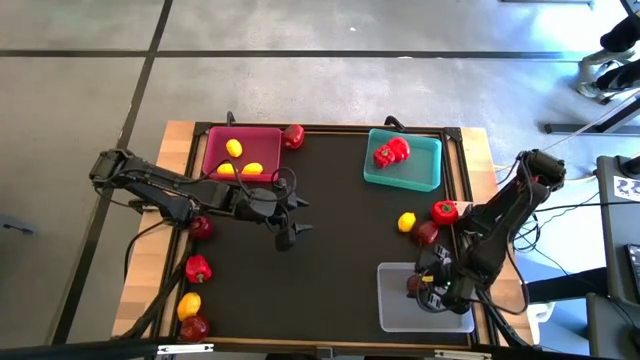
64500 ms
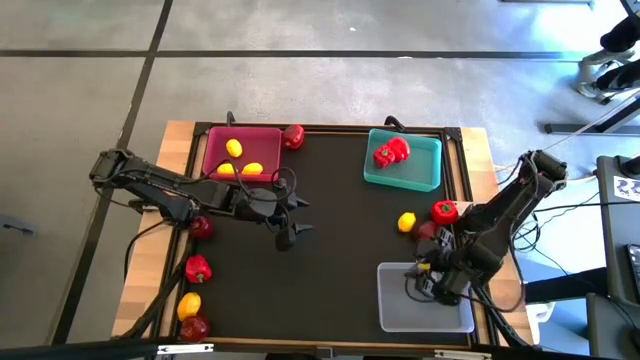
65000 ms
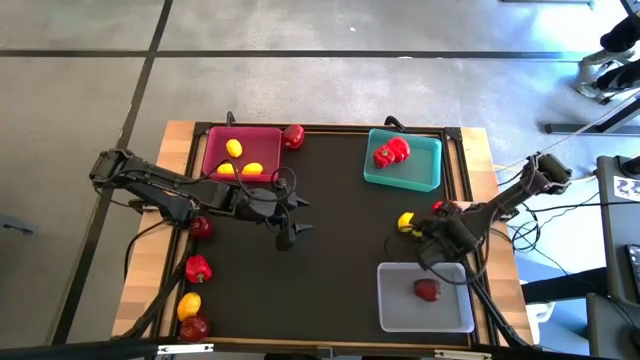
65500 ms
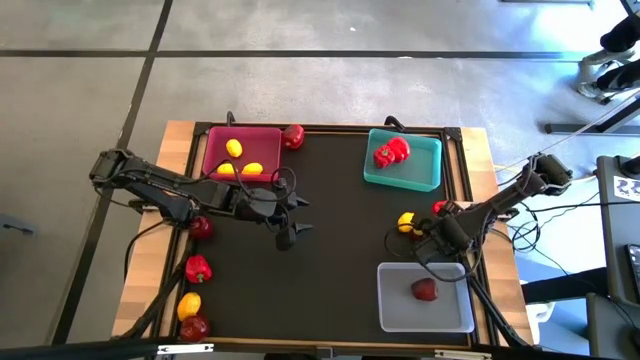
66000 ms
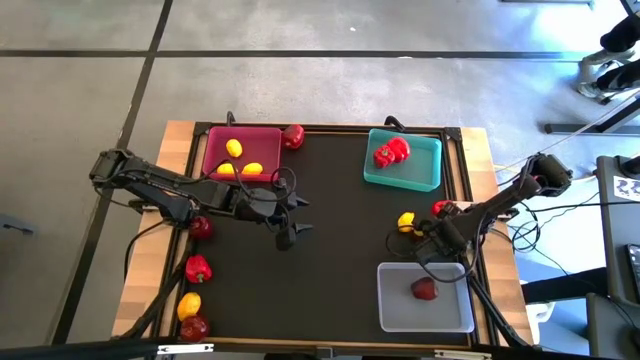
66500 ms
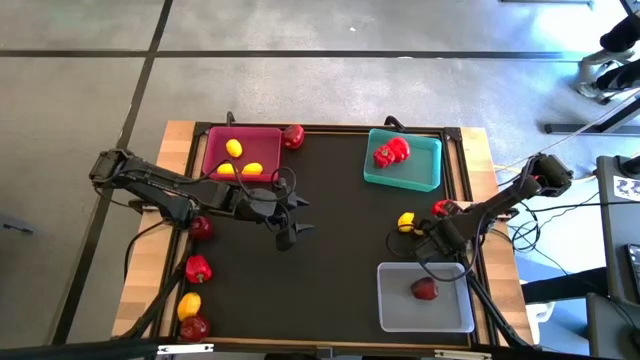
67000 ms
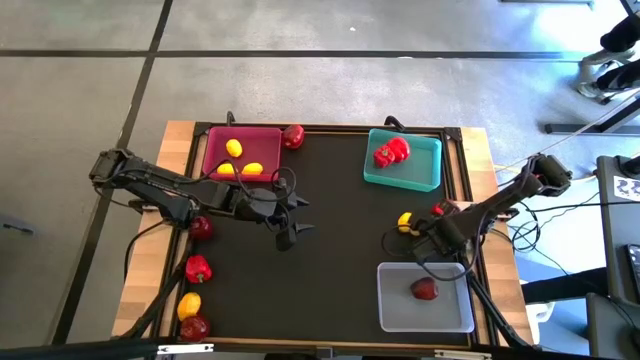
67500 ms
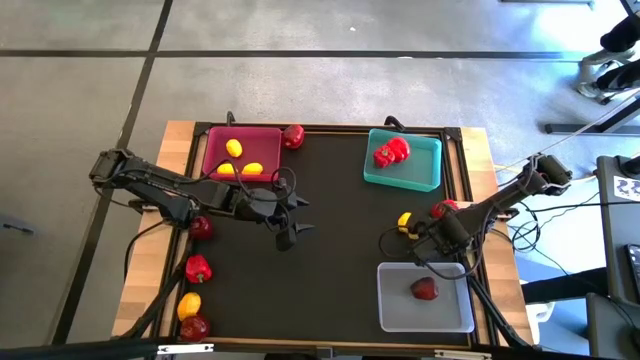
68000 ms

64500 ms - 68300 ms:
Task: Sort produce into baskets
Put the apple into the transparent bin

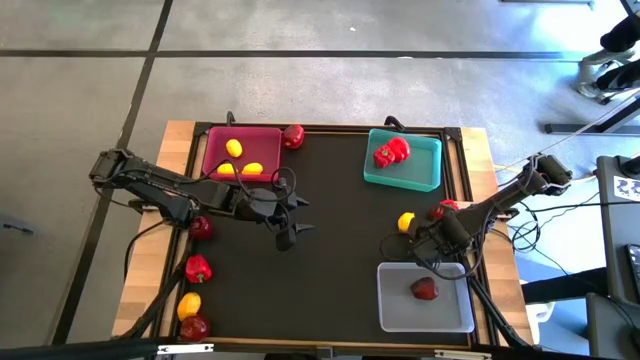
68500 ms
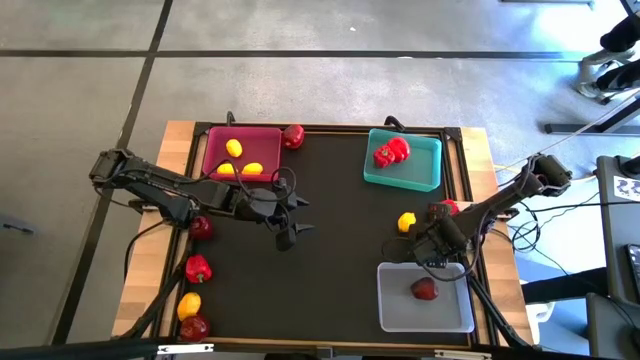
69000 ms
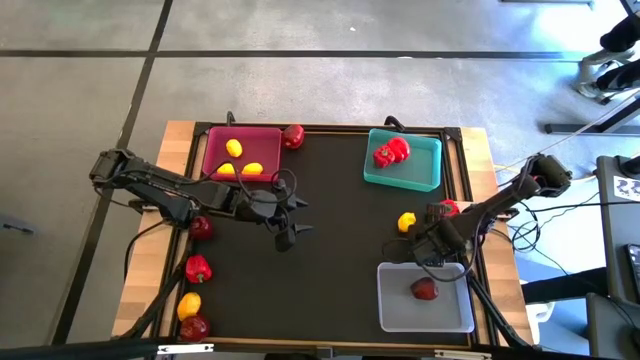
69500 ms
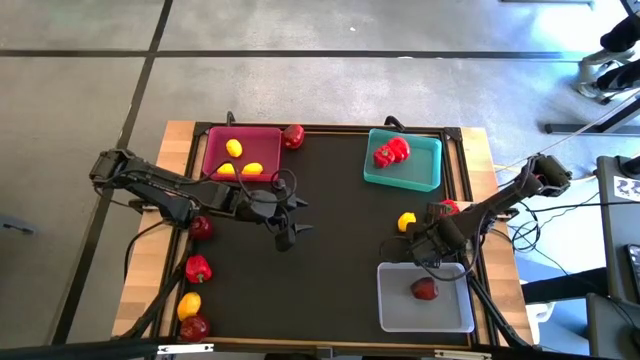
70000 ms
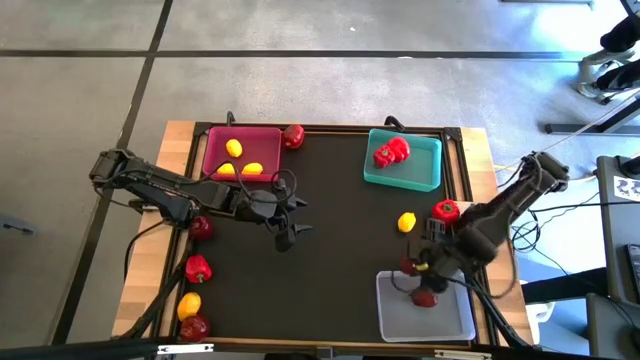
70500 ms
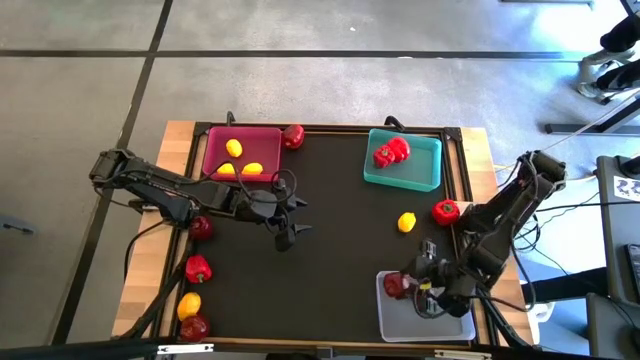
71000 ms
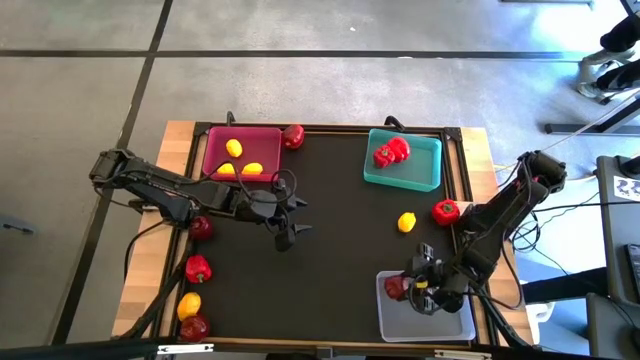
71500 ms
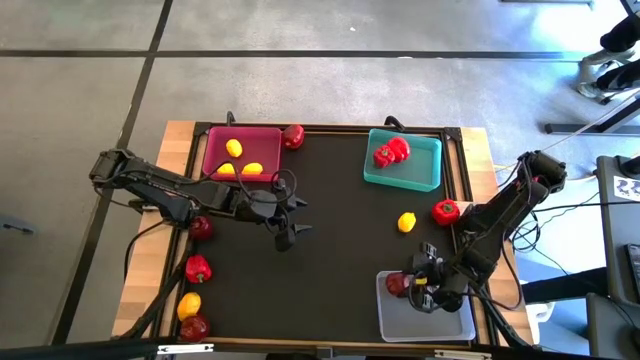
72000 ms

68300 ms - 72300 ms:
Put the apple into the transparent bin

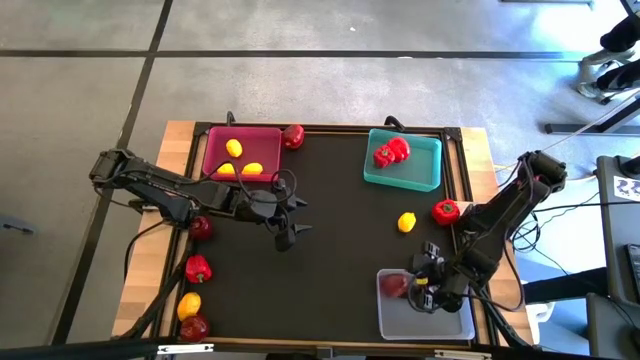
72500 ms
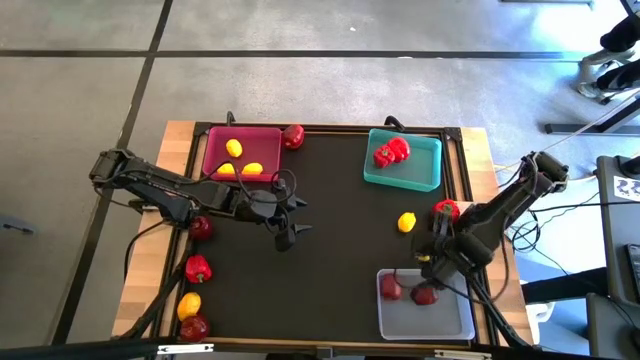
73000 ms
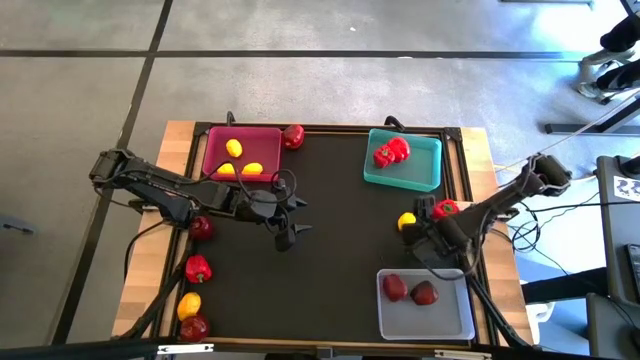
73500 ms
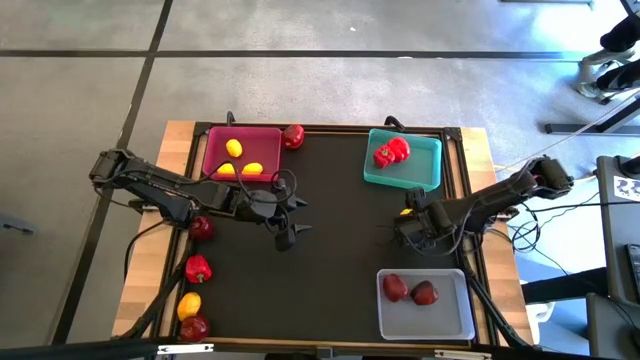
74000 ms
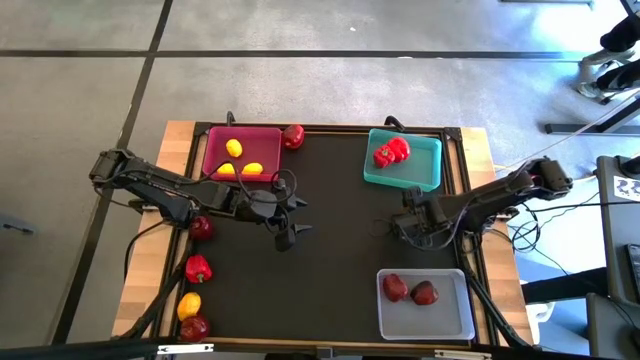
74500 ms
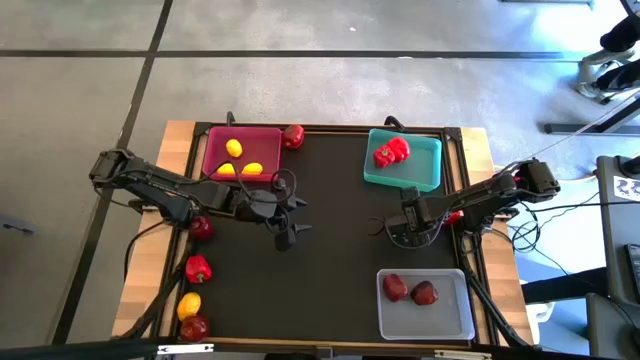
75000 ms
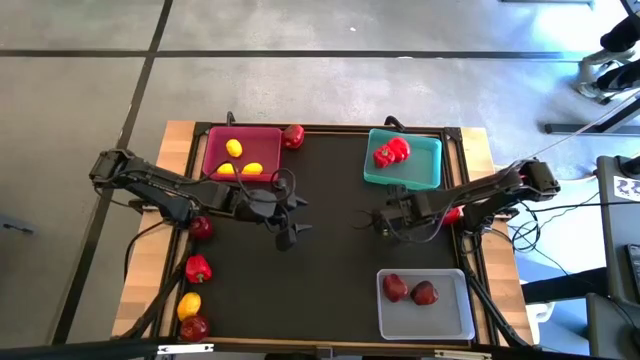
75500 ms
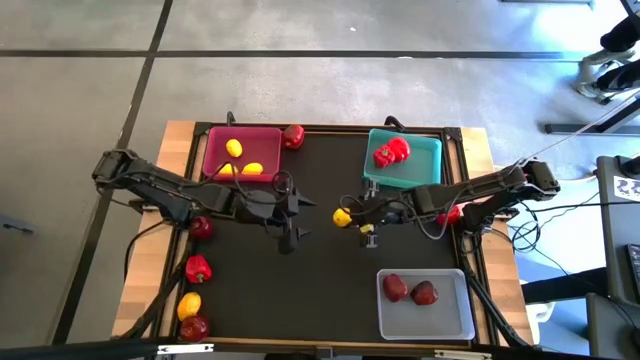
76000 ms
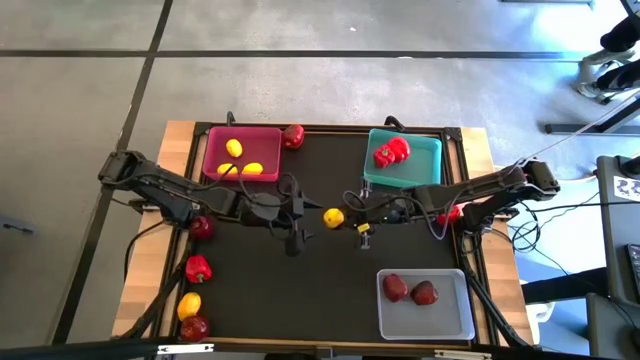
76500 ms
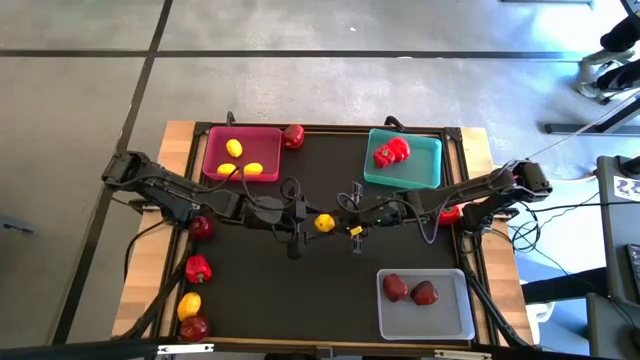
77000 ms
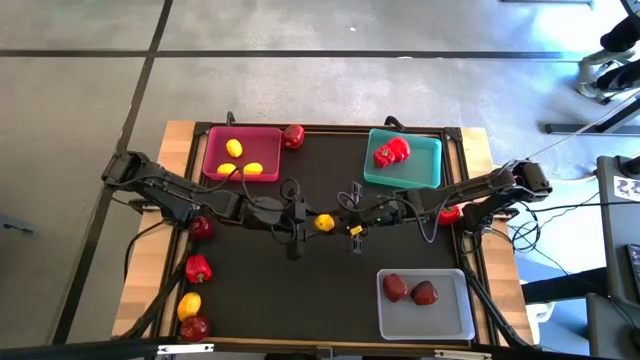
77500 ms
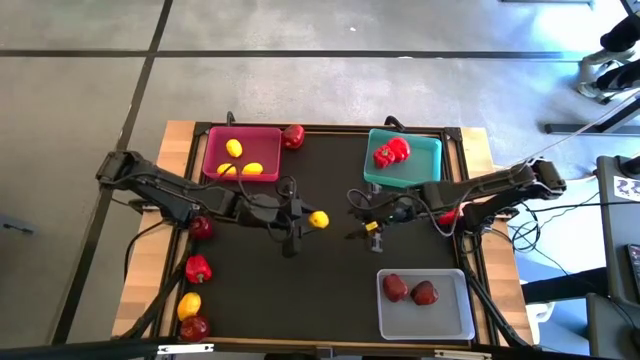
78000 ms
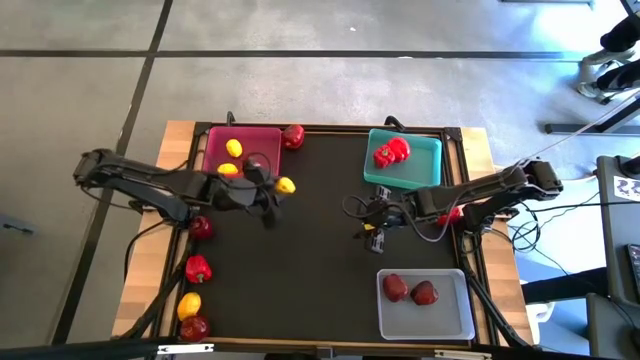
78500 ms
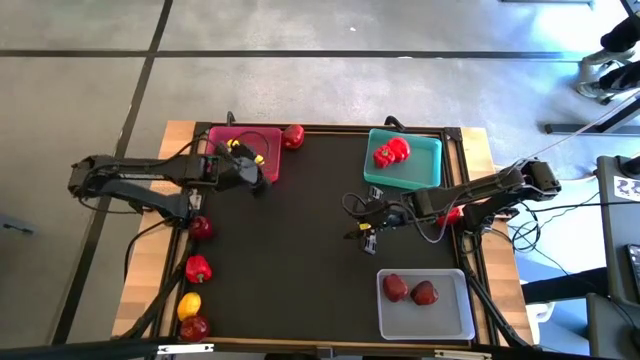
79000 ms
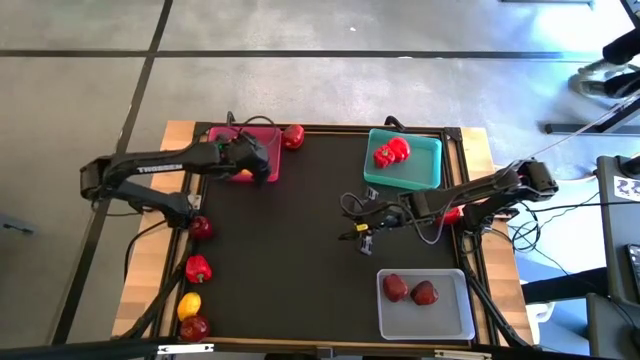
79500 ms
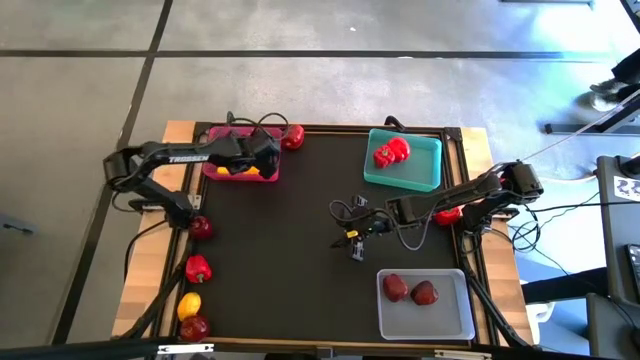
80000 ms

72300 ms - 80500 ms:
Put the lemon into the pink bin

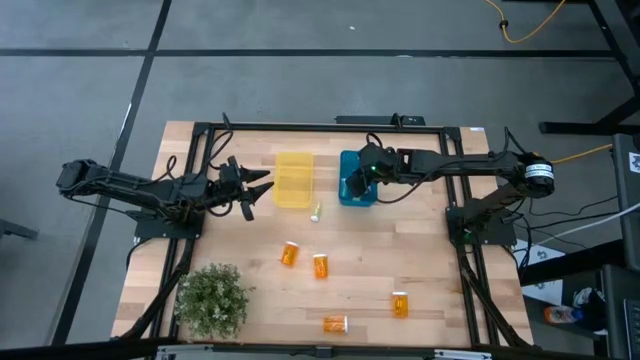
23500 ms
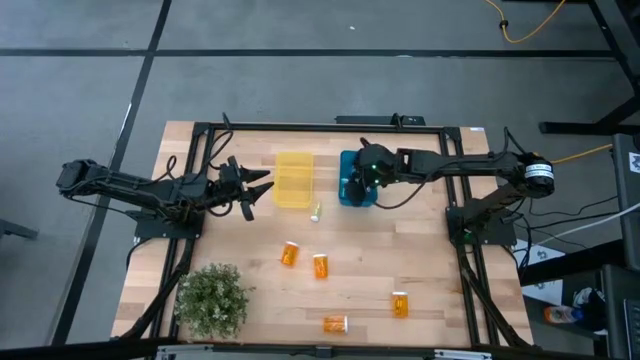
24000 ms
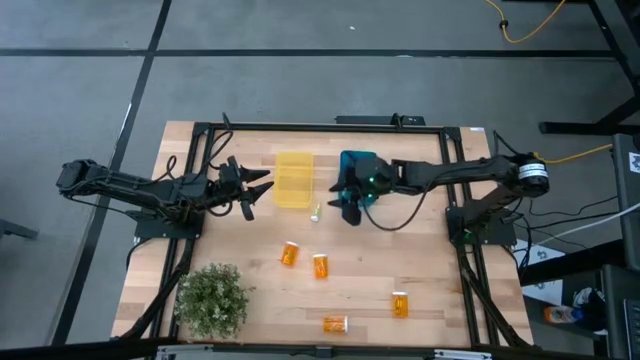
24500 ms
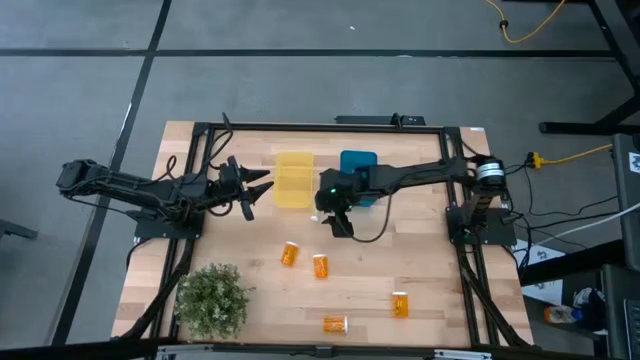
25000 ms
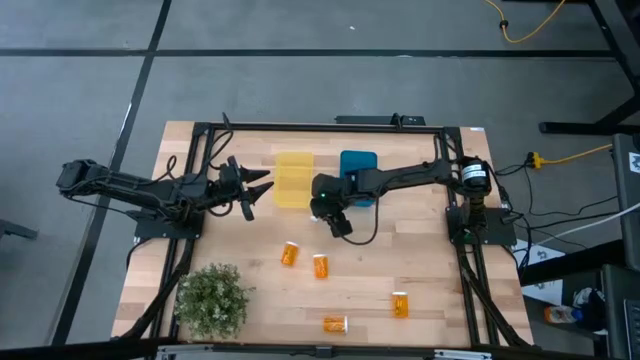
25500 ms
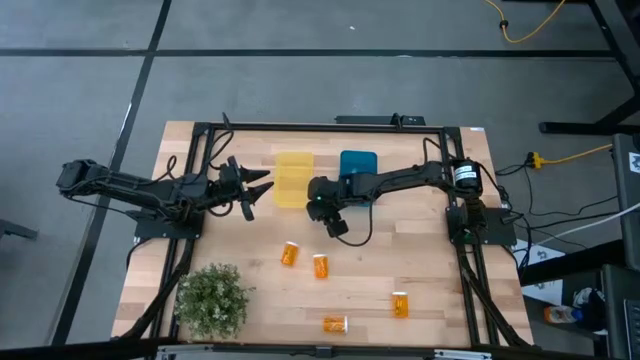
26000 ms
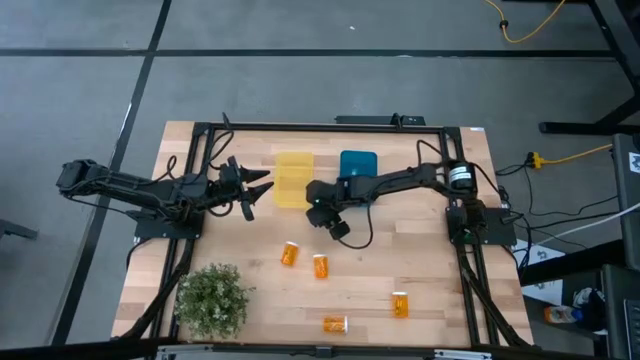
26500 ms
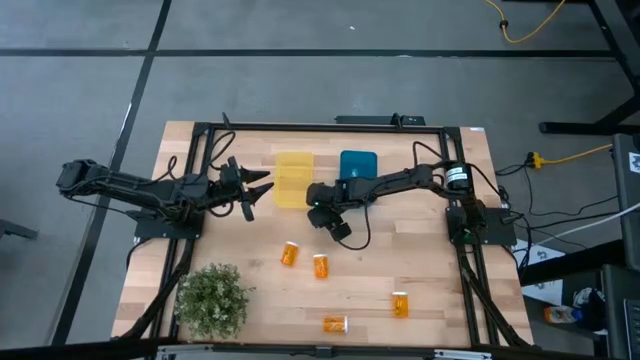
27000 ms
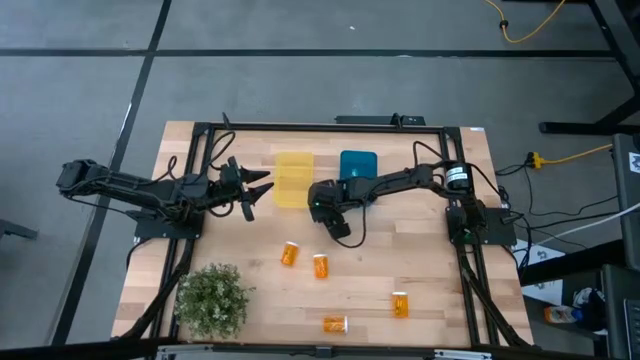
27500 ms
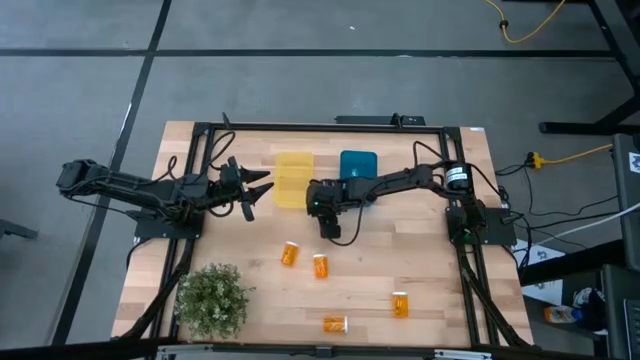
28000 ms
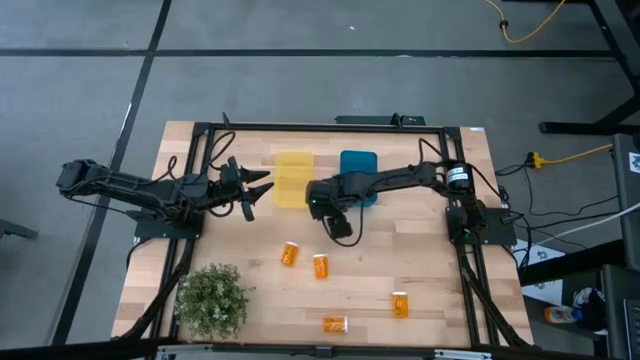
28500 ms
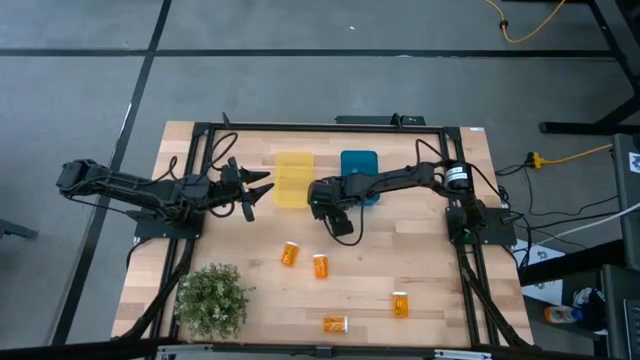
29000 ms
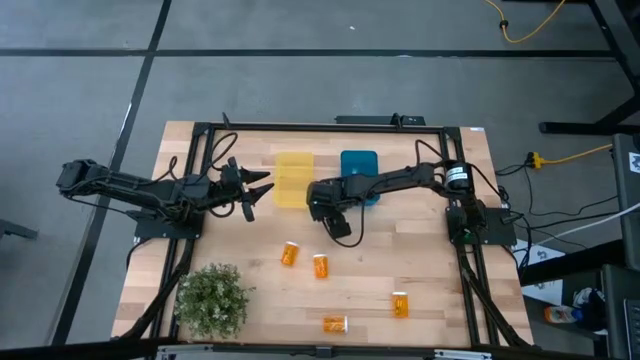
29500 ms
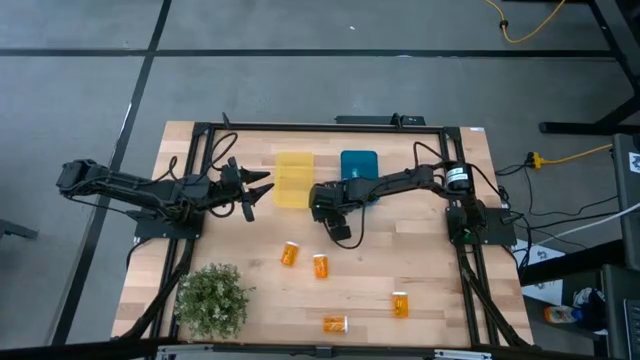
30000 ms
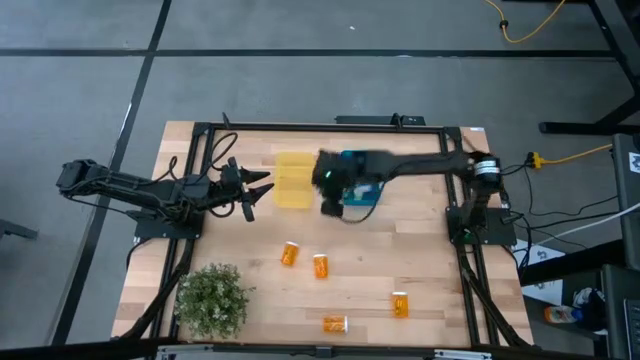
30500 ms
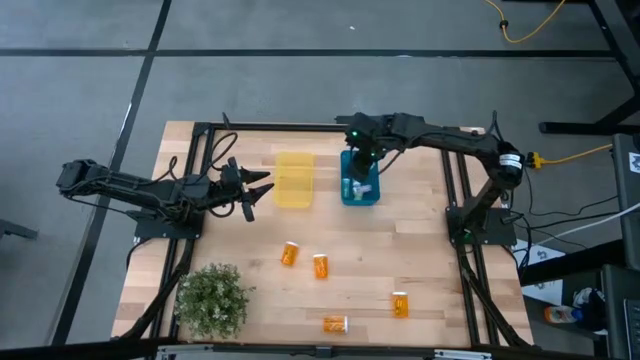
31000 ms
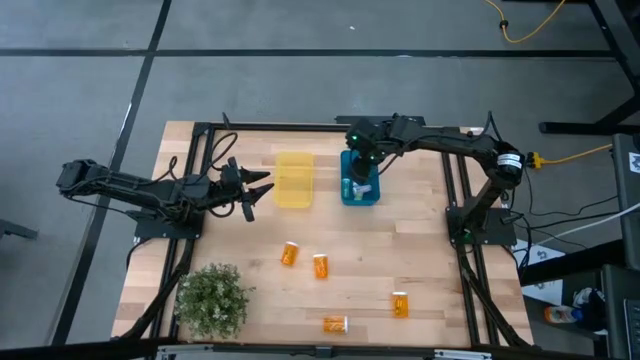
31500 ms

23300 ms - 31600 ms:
Task: Pick and place medicine bottles into bin by pill shape (circle, oval)
Put the yellow pill bottle into the blue bin
